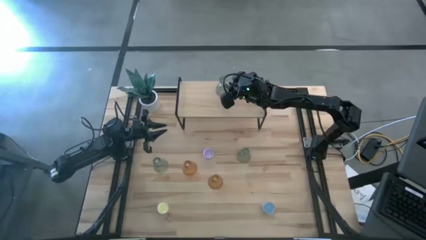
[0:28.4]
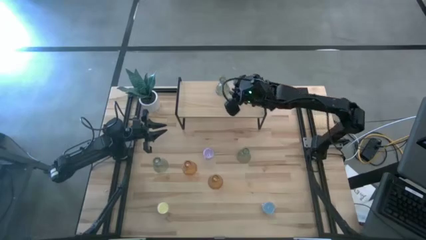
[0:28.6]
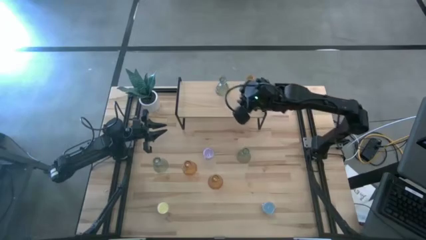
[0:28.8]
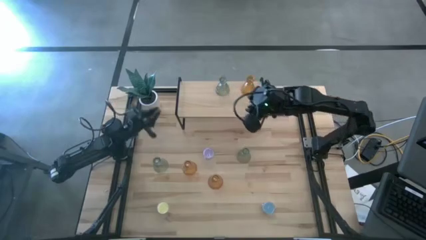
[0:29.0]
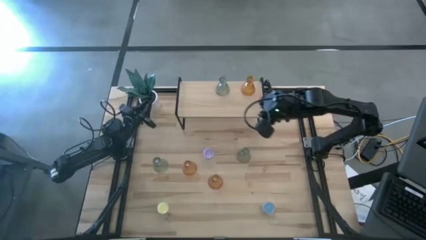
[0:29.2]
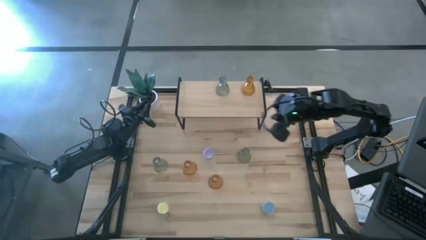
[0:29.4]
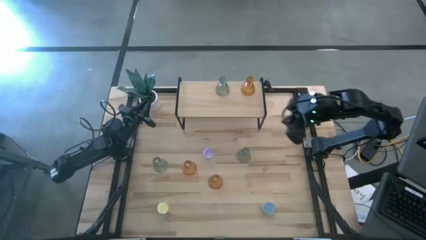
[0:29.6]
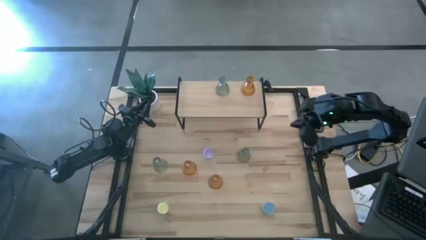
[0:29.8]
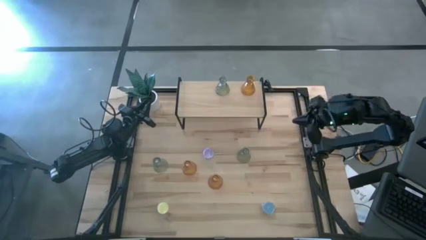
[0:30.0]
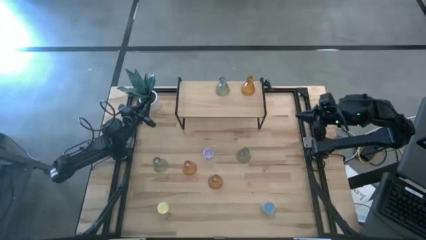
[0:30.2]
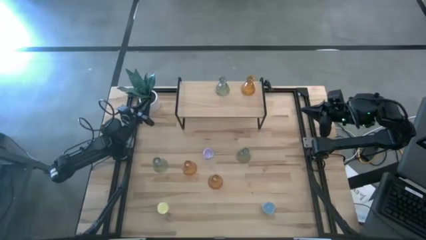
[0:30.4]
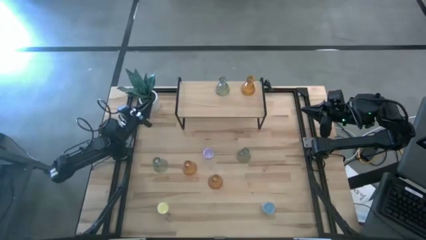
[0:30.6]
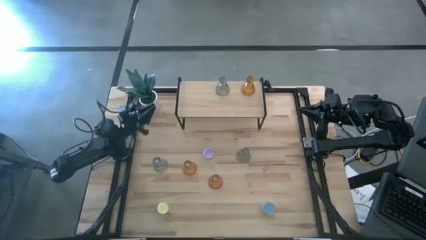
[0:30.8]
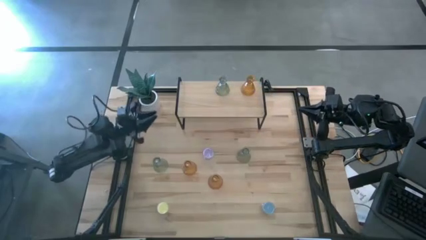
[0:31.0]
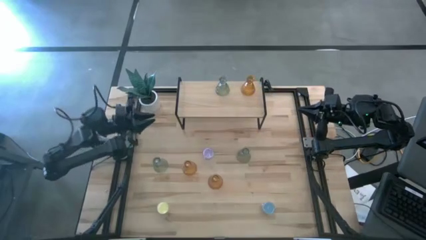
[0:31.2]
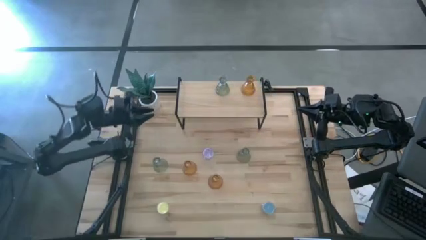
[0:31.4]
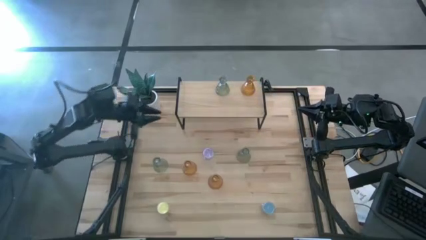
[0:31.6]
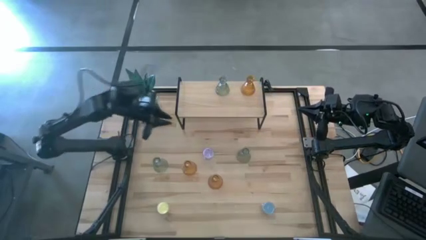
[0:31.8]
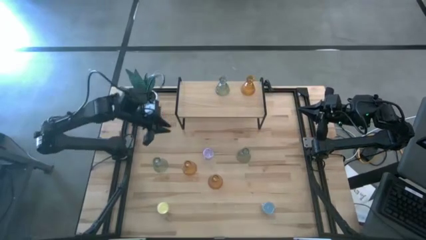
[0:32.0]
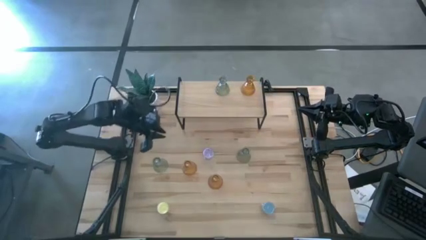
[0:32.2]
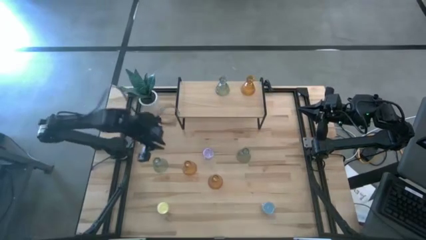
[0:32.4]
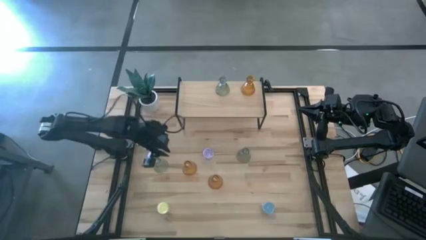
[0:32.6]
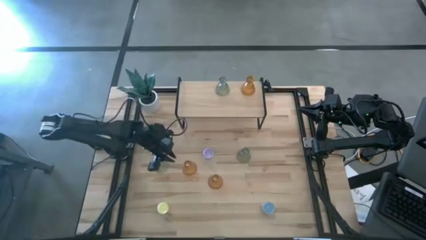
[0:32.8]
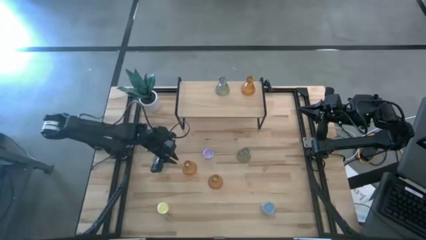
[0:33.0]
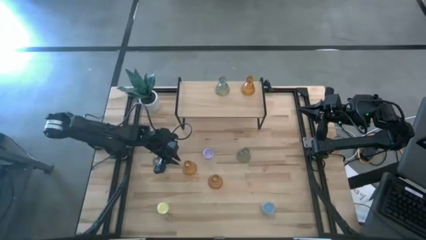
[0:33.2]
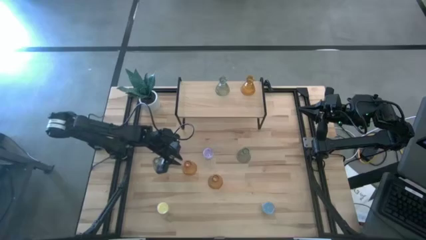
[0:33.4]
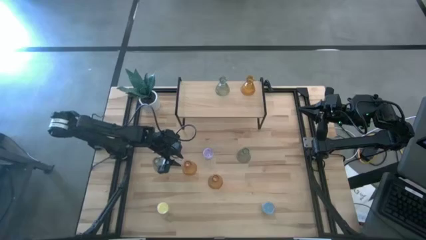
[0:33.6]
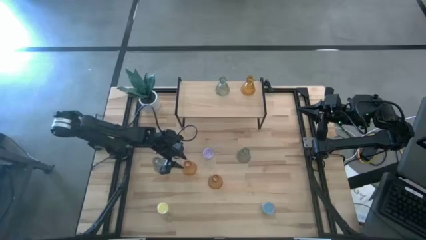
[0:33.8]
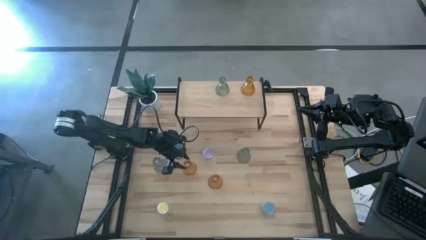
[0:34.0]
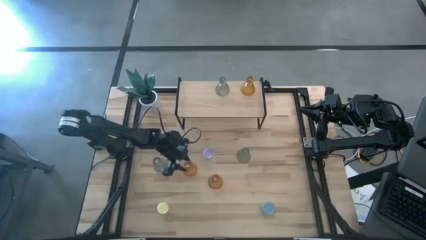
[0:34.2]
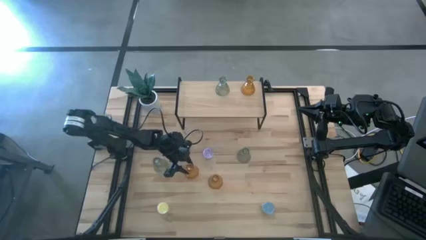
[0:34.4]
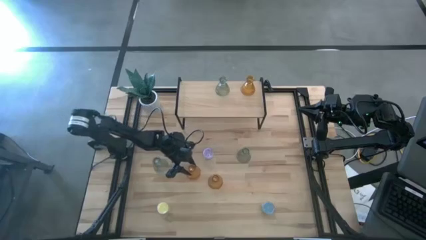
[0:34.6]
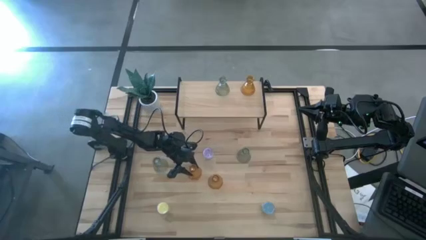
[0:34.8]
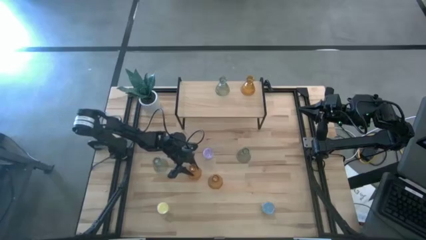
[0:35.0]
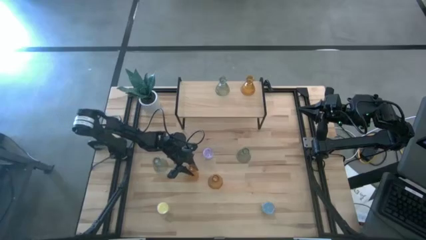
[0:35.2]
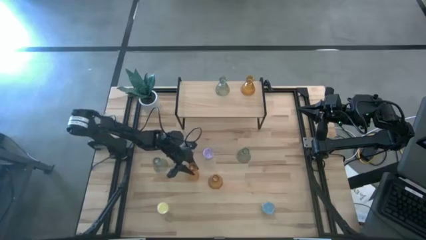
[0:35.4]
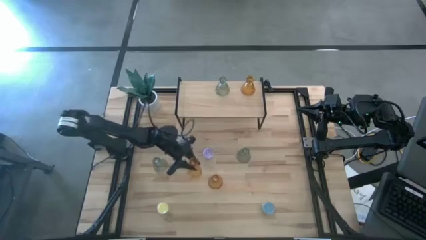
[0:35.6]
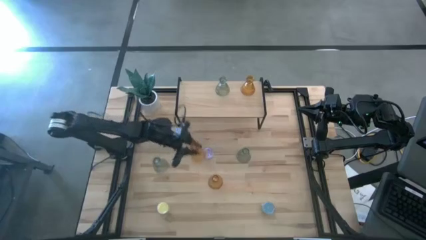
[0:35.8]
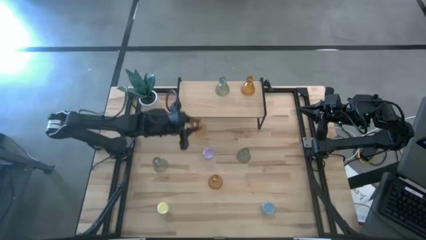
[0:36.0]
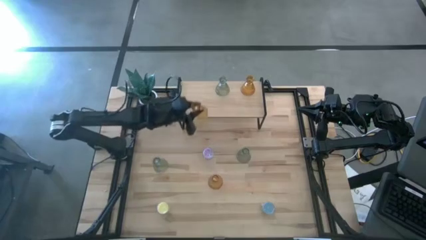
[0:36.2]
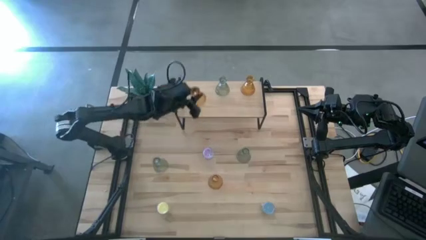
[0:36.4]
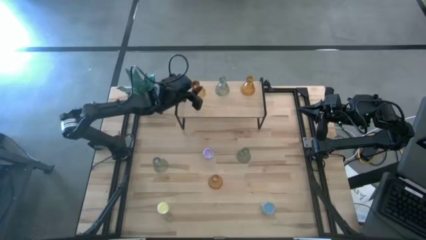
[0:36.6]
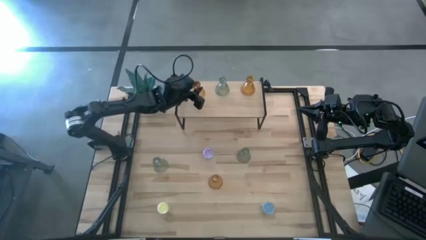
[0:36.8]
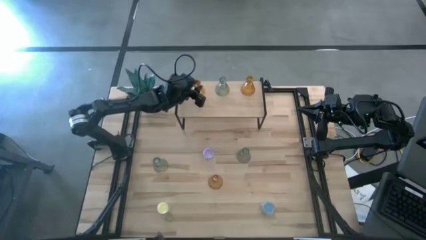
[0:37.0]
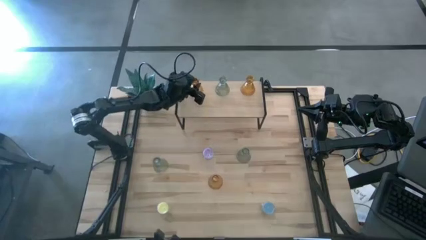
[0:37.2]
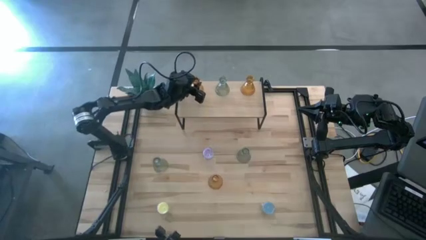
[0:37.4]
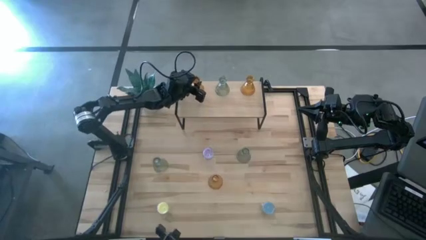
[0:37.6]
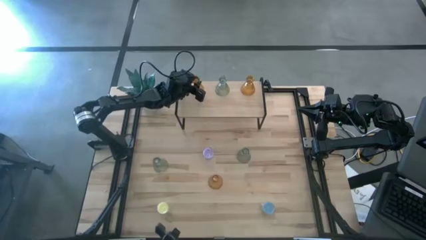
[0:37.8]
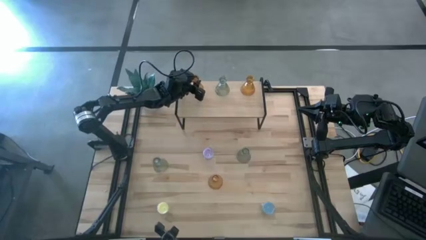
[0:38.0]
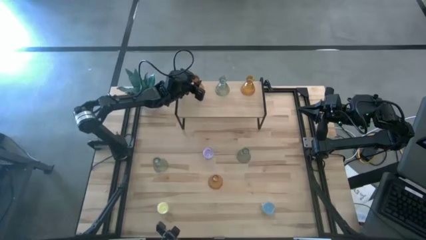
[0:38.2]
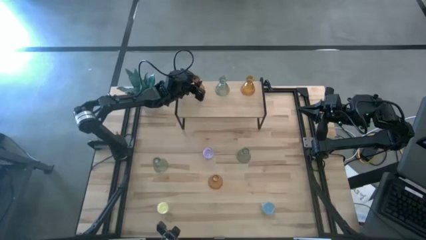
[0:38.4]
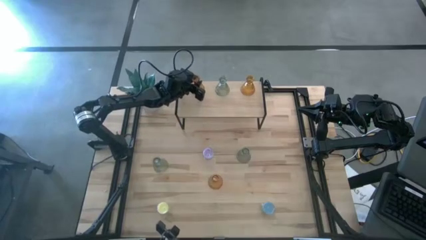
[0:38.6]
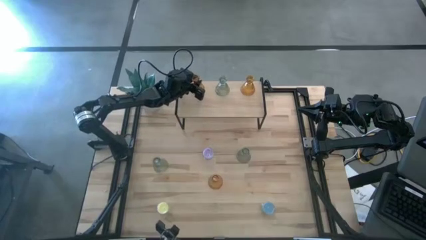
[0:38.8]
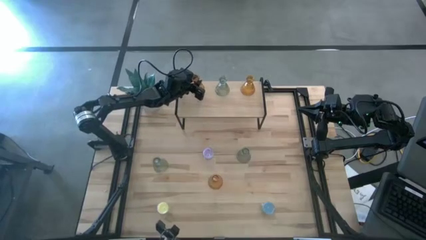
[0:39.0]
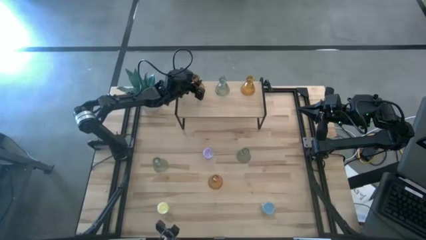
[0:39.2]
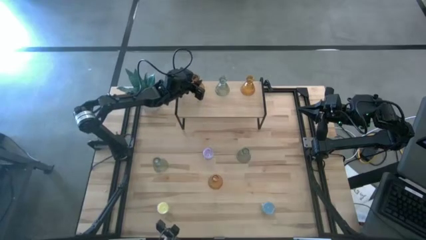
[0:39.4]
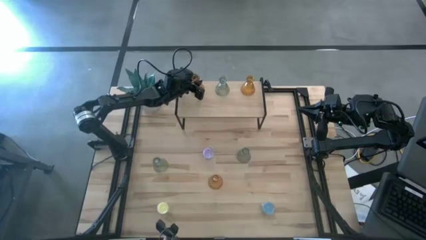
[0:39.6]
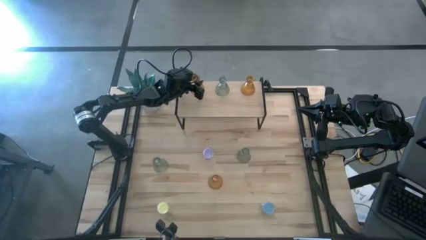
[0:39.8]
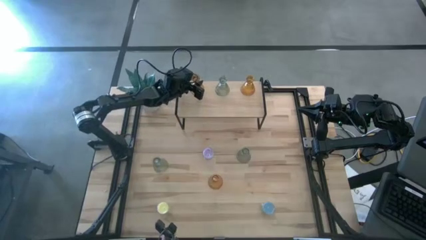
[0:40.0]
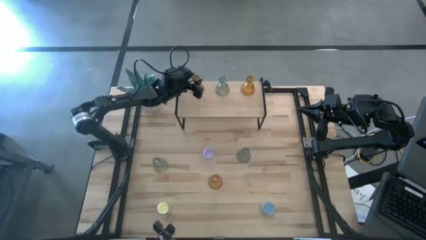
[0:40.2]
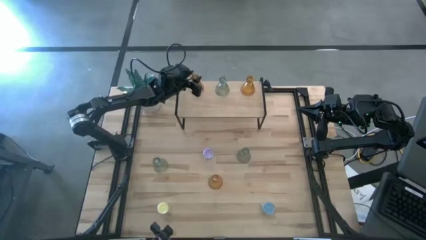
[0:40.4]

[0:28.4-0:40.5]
Task: Pick & Place candle stick holders
Put the top brown glass candle holder on the shelf
